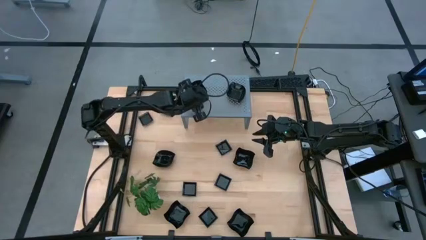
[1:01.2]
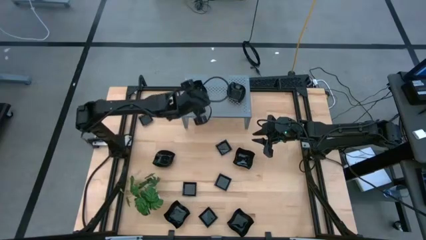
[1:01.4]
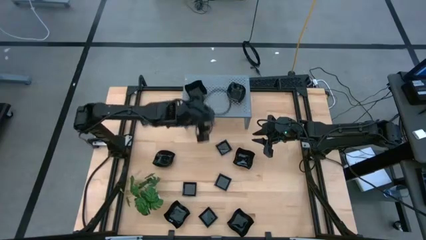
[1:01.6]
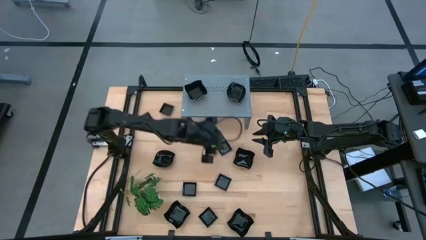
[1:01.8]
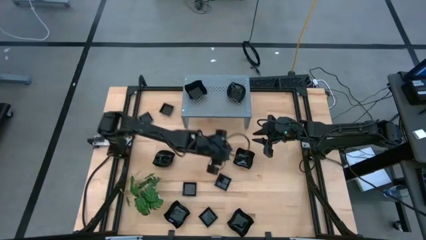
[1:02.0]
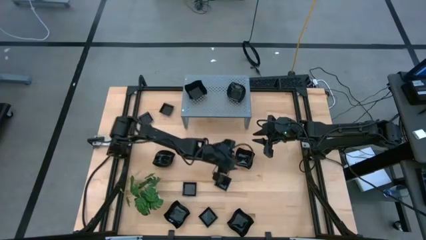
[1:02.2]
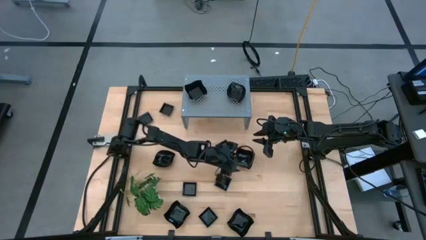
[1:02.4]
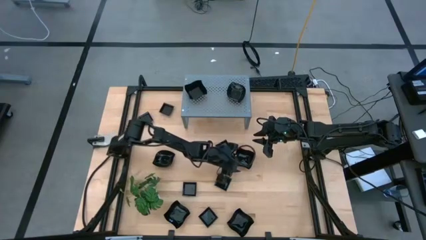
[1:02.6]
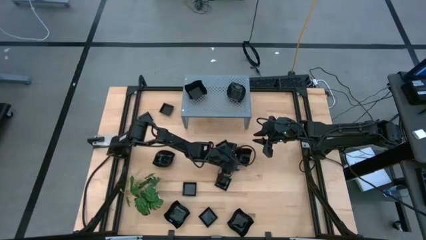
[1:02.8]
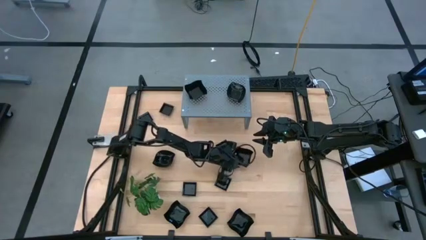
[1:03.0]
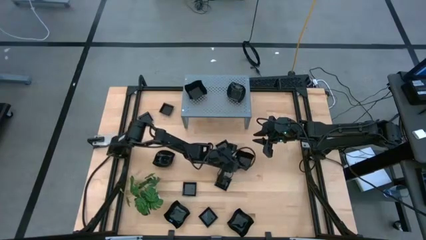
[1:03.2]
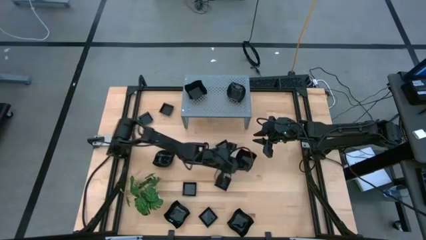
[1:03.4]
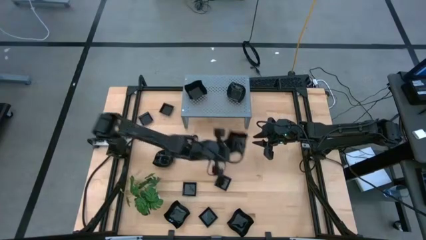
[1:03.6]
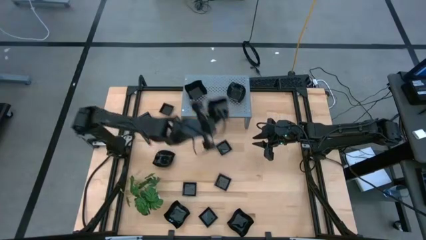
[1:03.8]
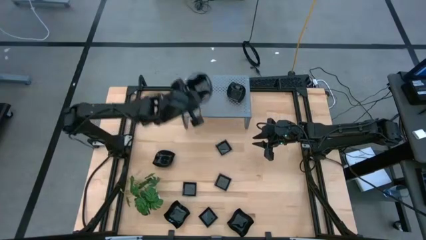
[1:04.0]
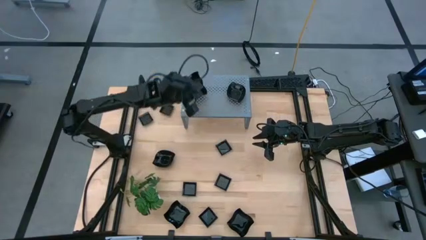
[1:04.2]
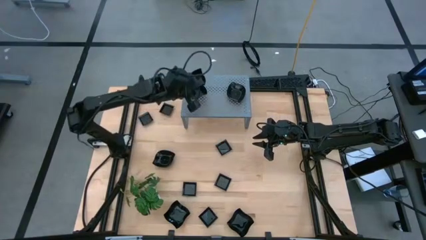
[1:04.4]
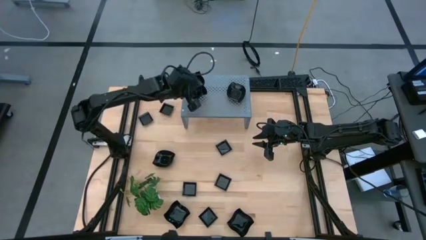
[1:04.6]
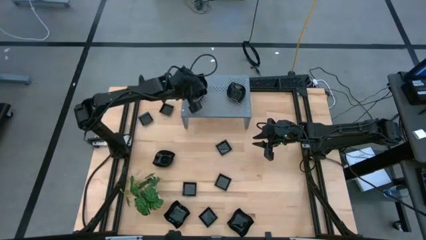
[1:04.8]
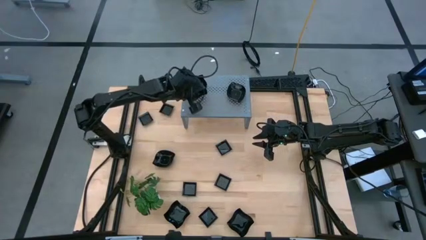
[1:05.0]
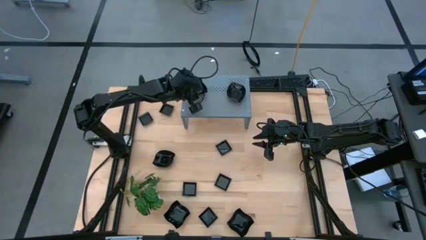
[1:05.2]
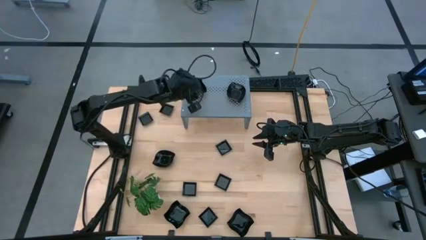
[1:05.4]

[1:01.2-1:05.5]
Task: Pick & Place Mini shaped plates
Stack the black distorted square plate on top of the black distorted square plate on the shelf

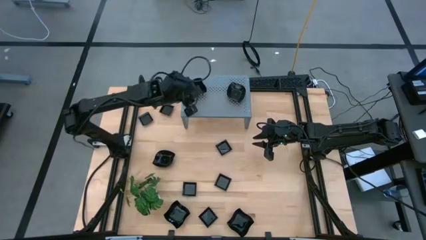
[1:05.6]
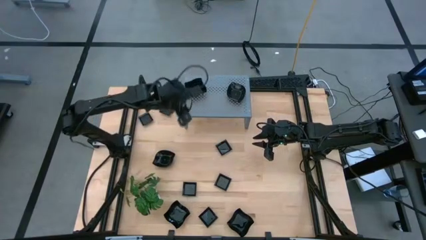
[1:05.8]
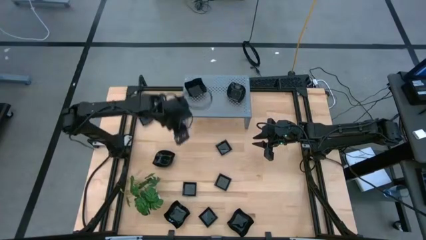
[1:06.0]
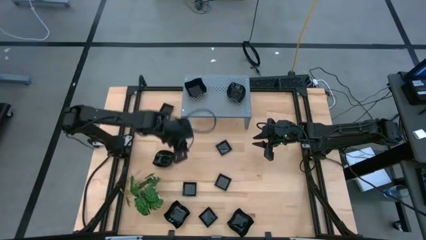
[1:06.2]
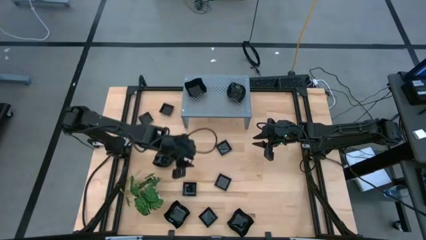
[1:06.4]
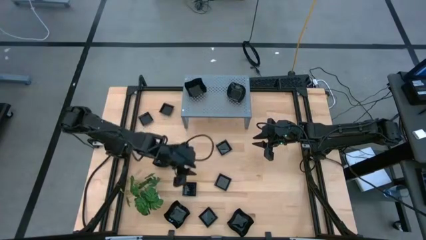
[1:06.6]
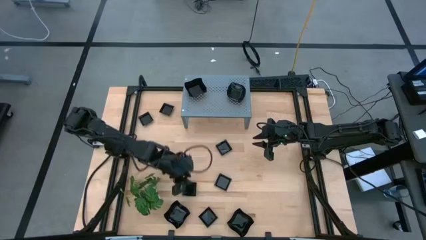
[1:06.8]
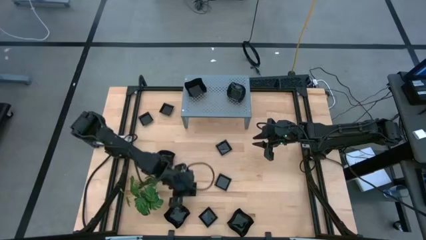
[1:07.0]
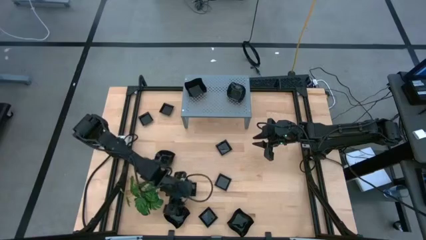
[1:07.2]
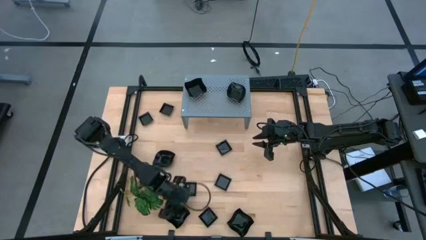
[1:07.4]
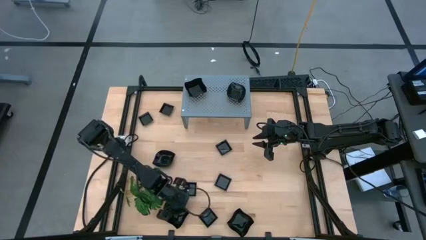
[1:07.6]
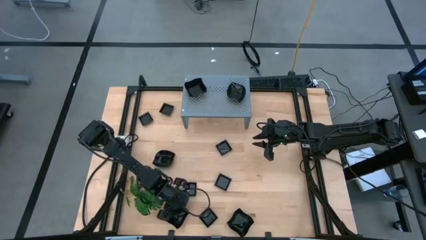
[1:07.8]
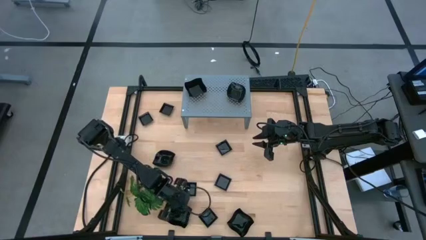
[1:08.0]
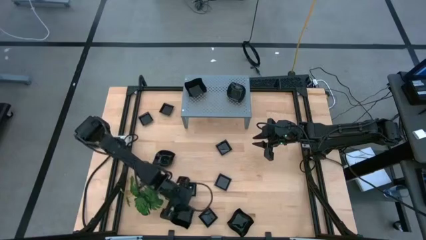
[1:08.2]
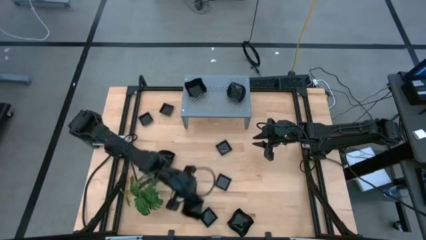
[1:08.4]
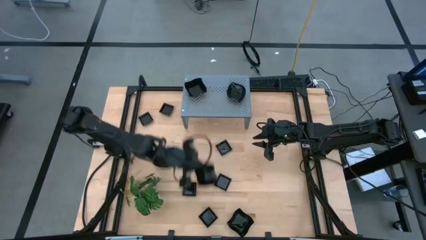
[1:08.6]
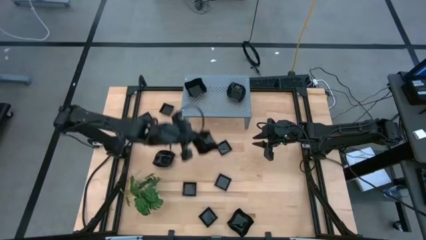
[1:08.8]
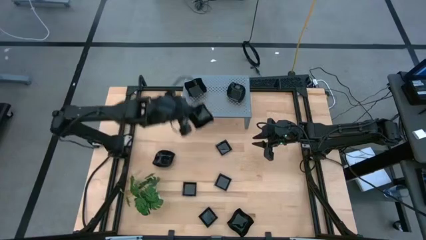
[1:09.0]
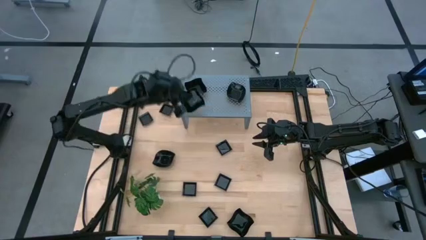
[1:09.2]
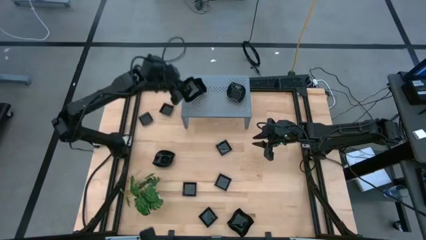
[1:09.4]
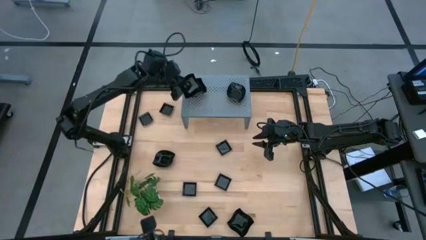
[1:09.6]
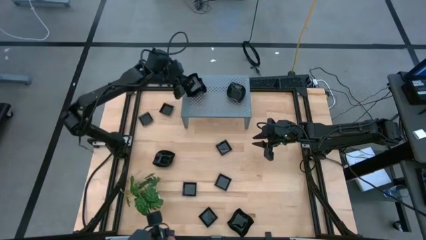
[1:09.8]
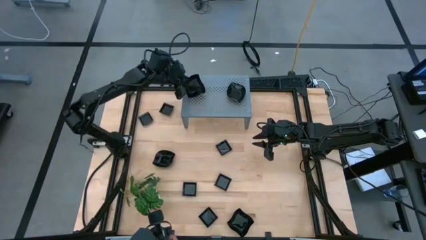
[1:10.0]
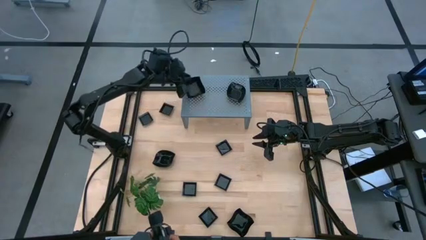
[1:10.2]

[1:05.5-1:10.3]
Stack the black distorted square plate on top of the black distorted square plates on the shelf

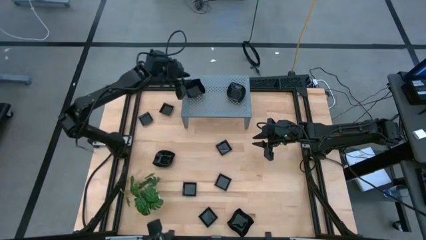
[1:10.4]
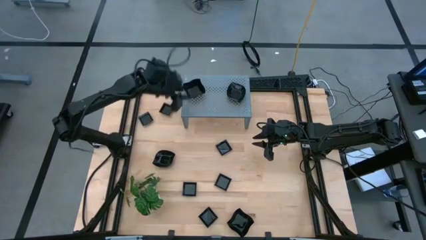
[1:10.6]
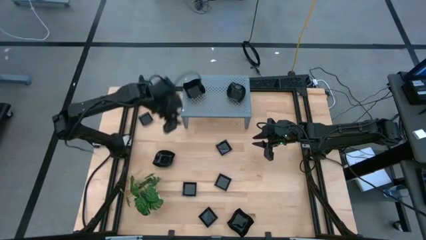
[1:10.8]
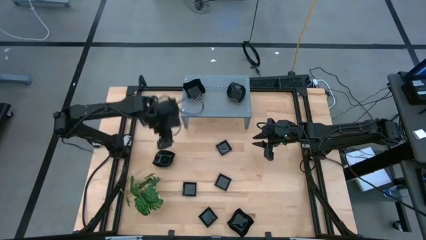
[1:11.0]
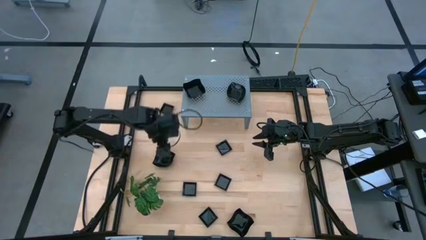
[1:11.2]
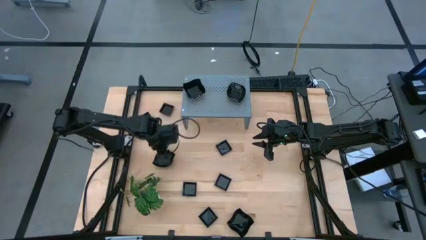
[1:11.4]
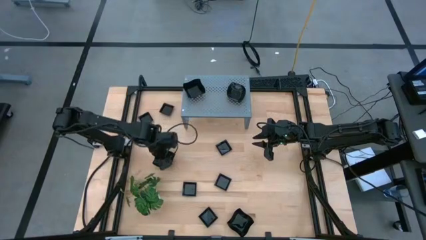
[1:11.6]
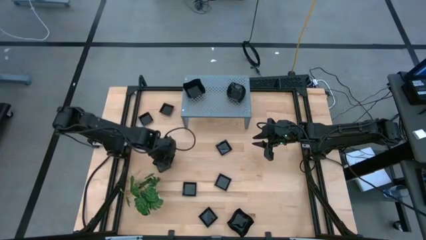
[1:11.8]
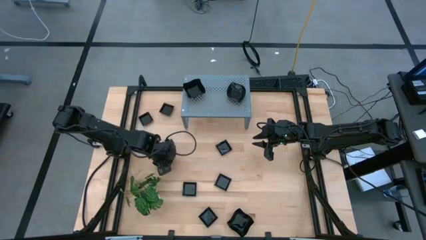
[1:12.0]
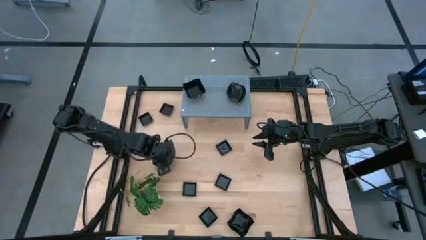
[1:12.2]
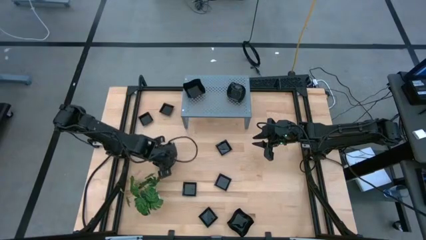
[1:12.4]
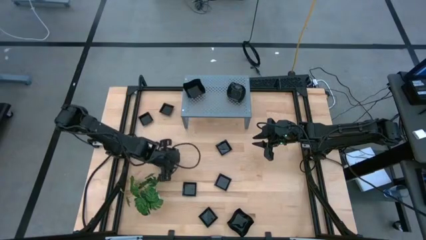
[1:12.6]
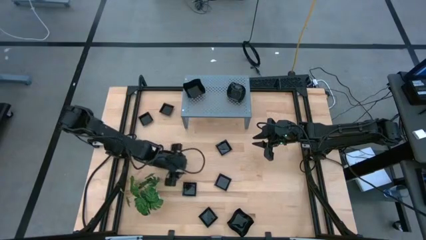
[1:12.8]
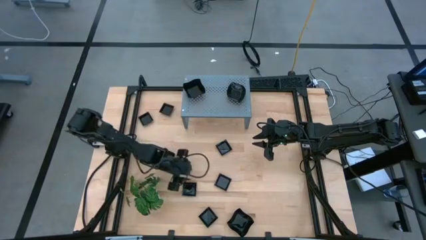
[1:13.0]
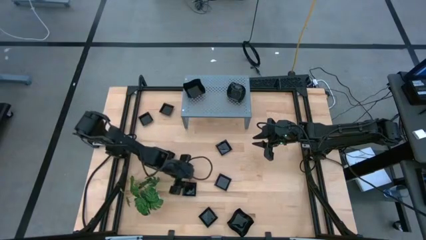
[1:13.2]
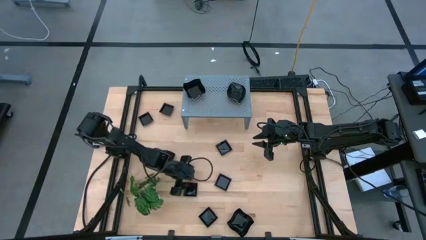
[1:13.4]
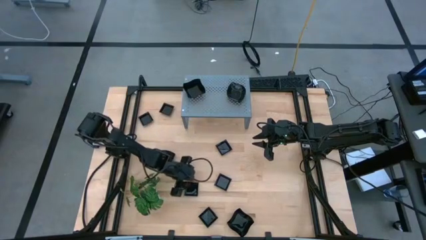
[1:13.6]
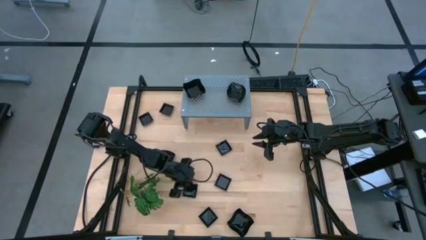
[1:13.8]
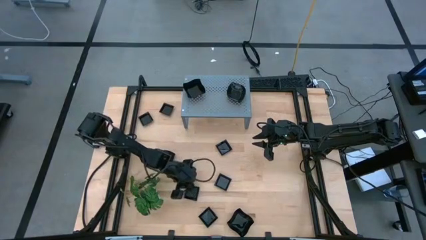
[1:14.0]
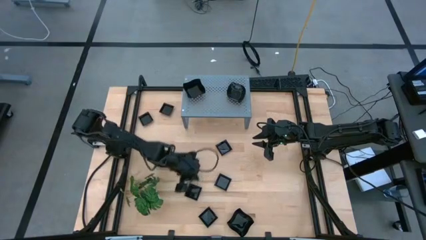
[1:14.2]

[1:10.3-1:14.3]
Put the black square plate on the shelf

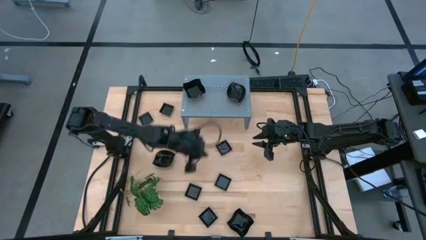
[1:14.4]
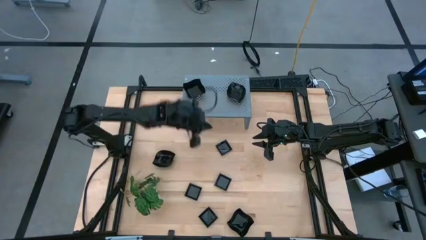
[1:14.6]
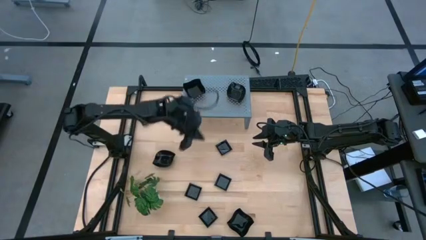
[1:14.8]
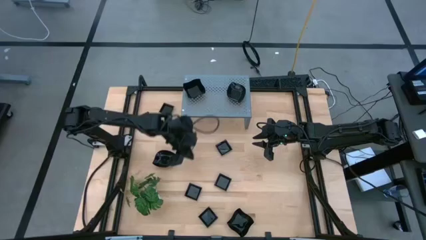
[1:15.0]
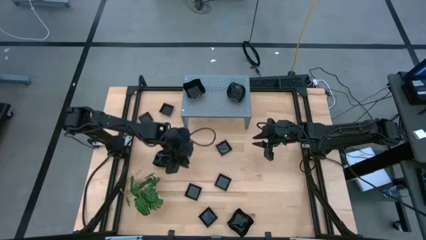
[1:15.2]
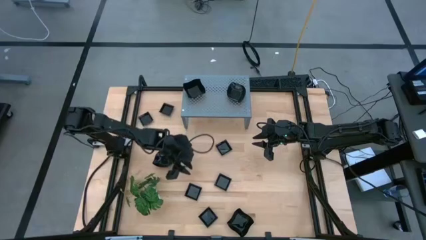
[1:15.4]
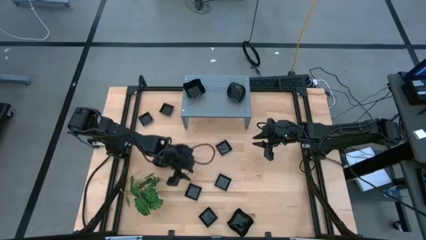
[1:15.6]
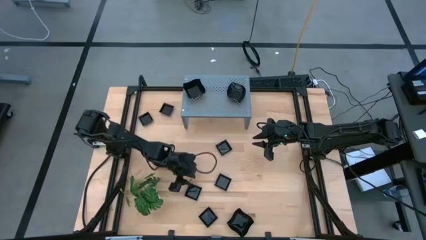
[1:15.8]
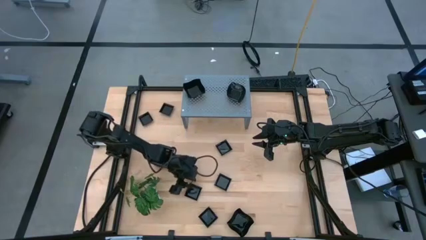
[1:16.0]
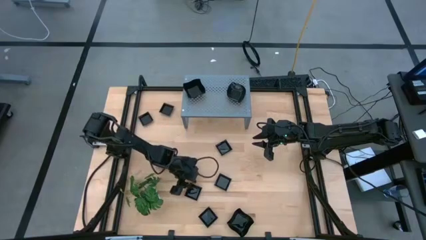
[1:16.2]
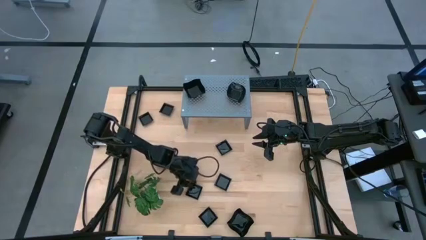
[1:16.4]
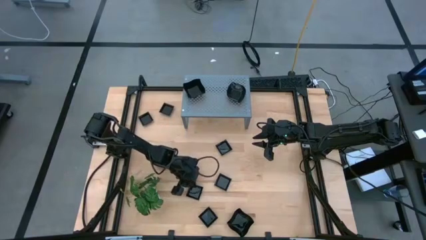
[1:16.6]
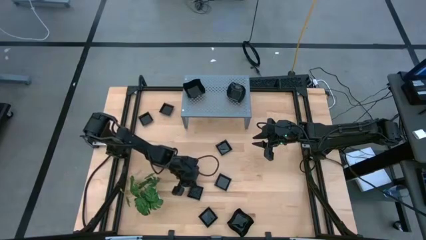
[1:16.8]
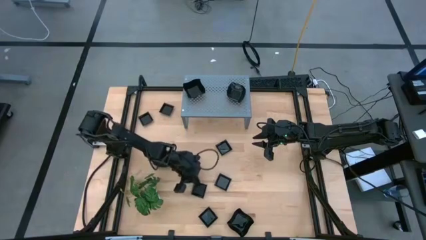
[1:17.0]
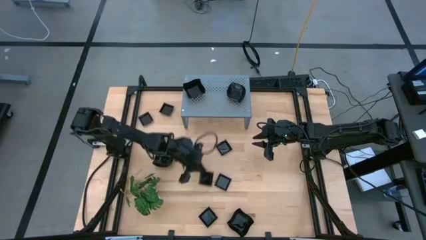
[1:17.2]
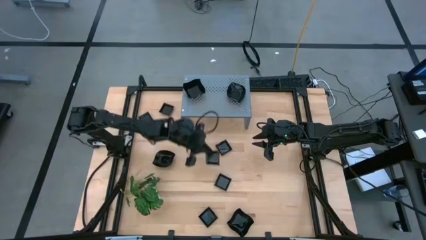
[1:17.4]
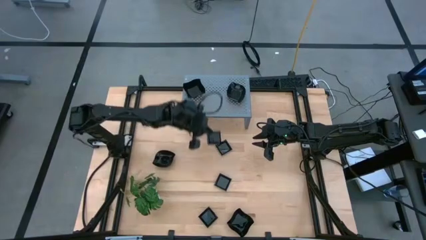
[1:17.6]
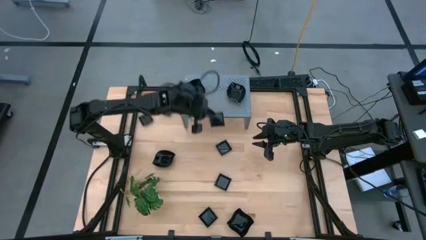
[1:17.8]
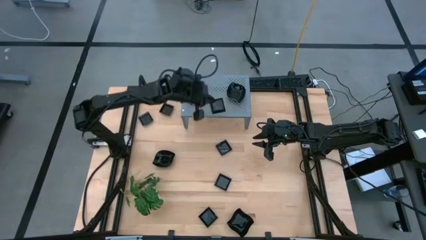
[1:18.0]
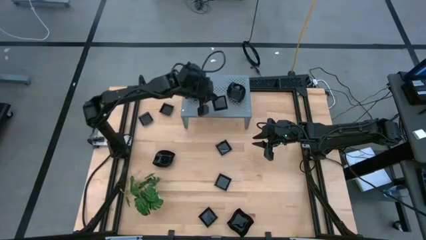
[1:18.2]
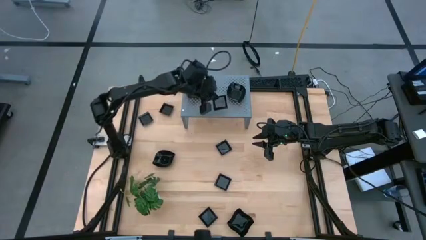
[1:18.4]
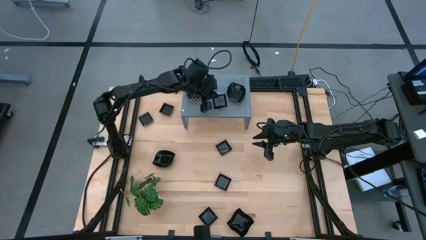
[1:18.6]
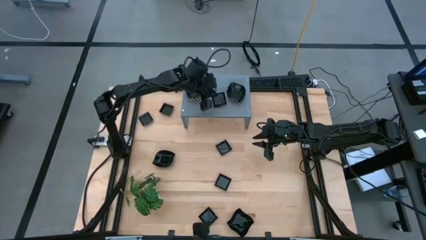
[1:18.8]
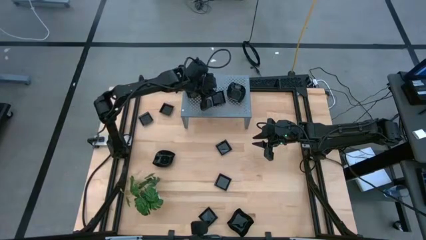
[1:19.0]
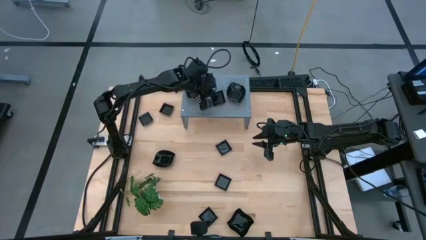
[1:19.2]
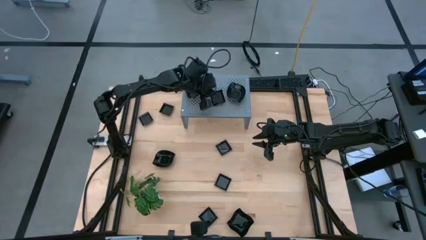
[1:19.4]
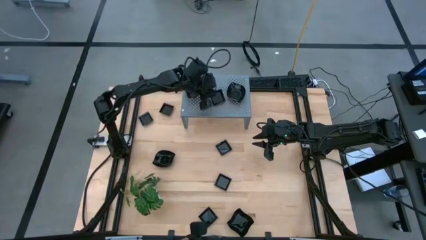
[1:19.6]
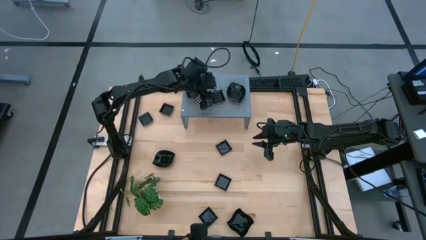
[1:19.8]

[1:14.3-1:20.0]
Put the black square plate on the shelf
